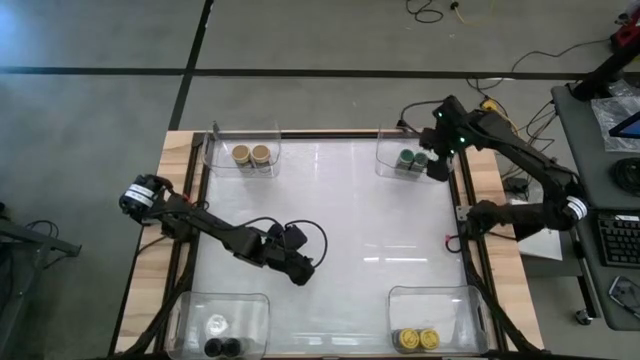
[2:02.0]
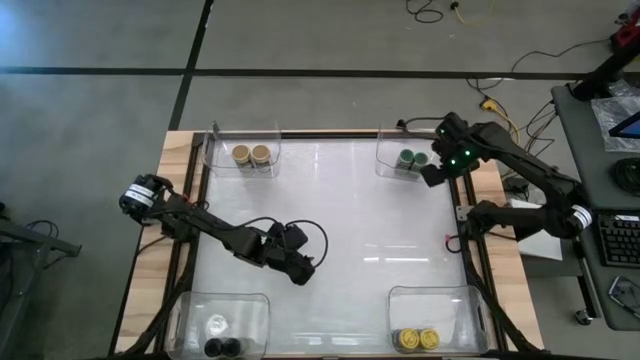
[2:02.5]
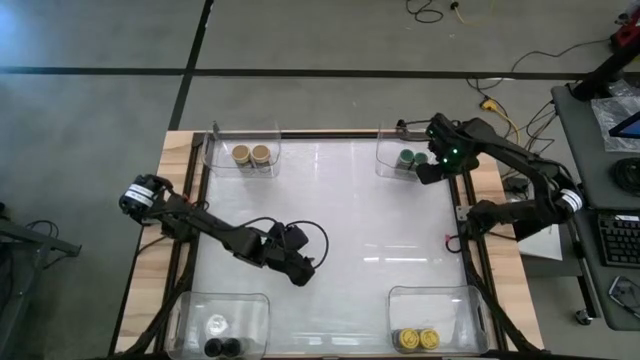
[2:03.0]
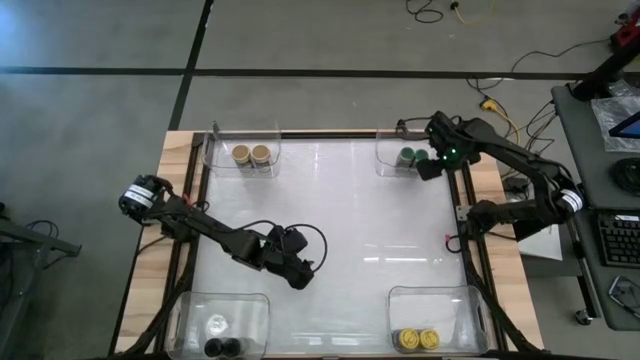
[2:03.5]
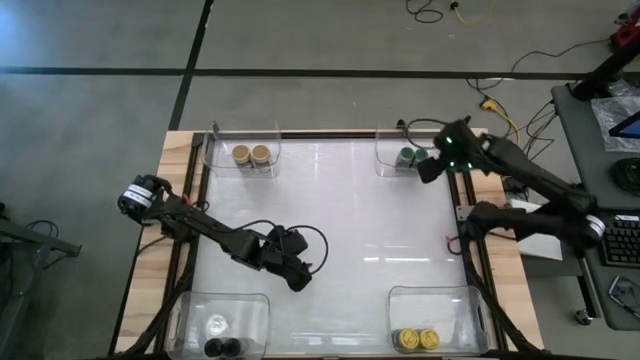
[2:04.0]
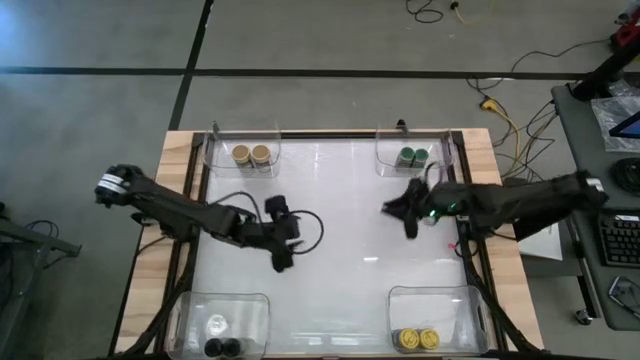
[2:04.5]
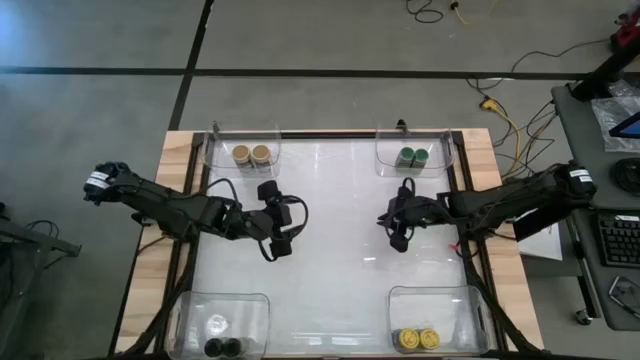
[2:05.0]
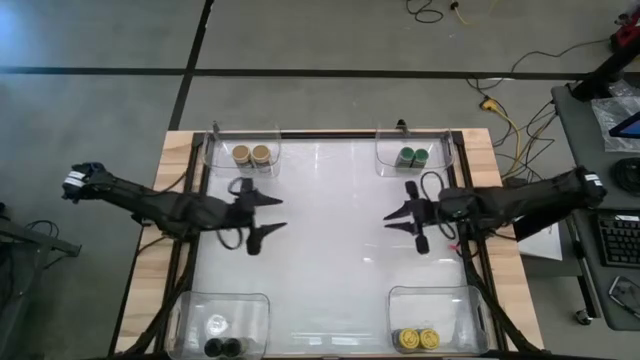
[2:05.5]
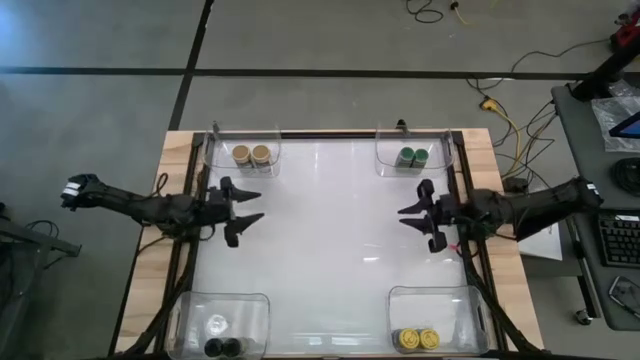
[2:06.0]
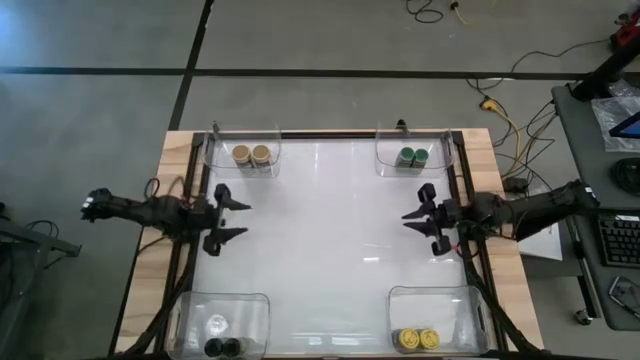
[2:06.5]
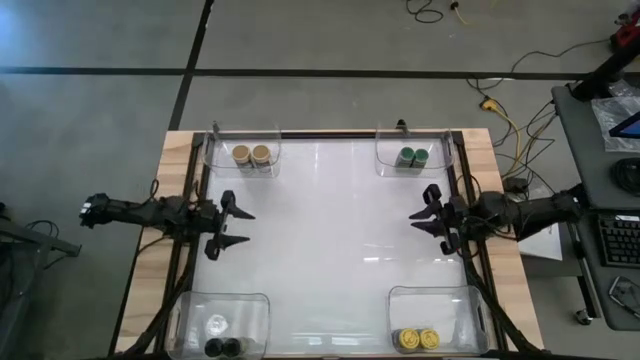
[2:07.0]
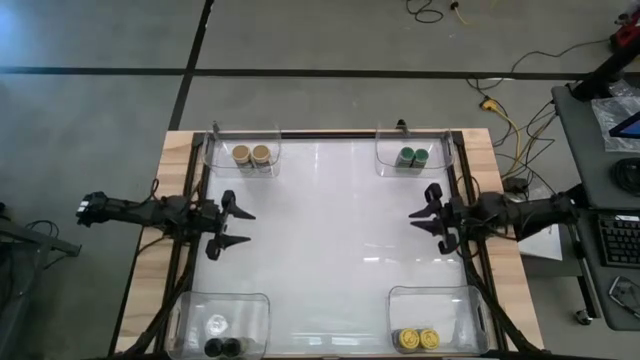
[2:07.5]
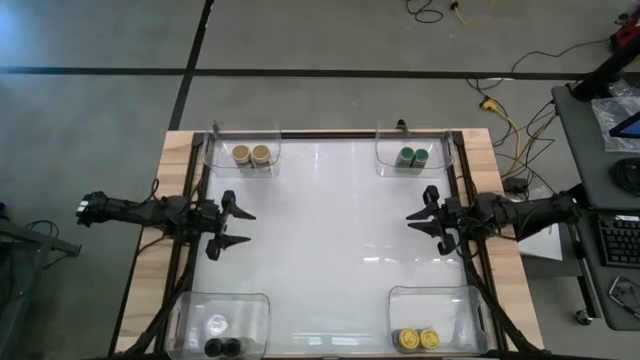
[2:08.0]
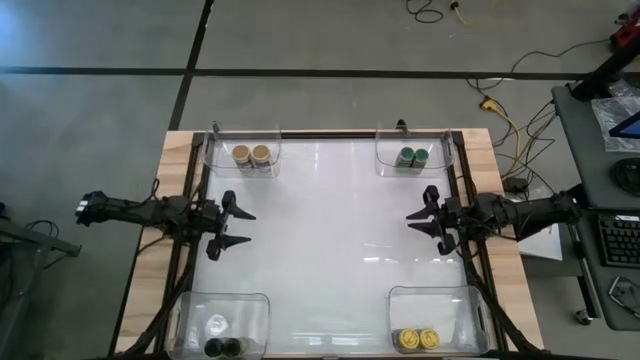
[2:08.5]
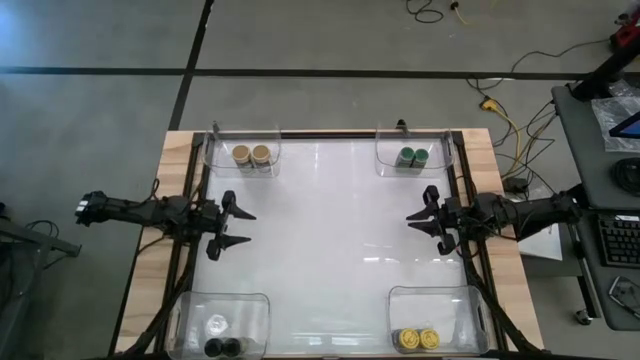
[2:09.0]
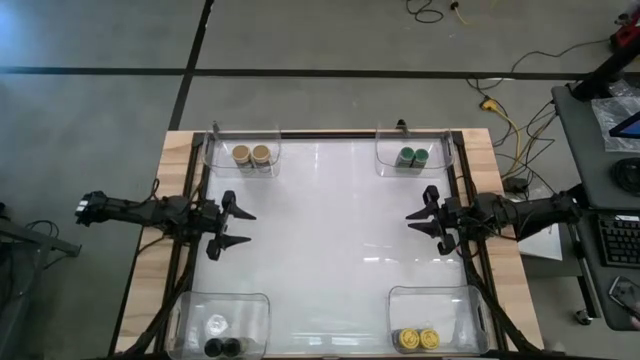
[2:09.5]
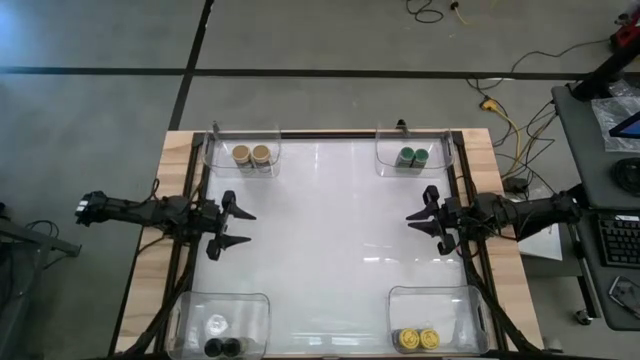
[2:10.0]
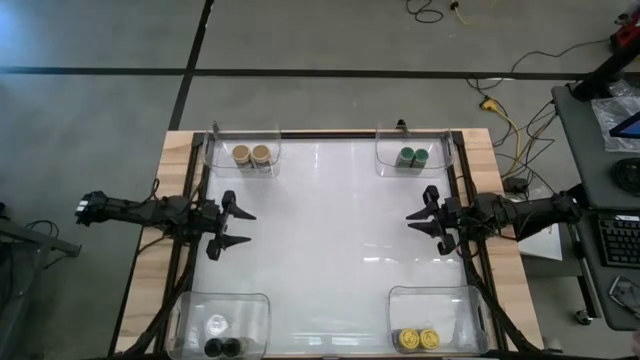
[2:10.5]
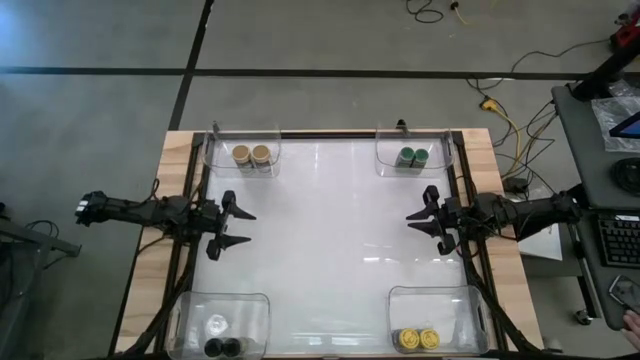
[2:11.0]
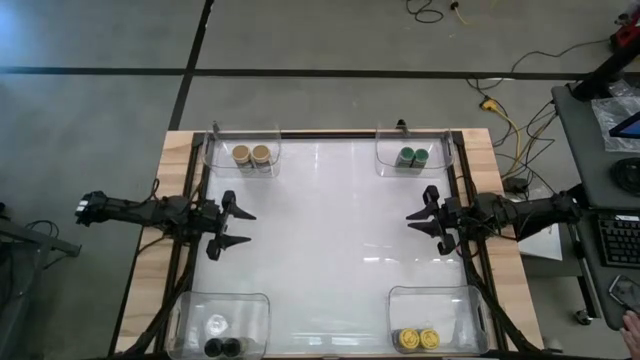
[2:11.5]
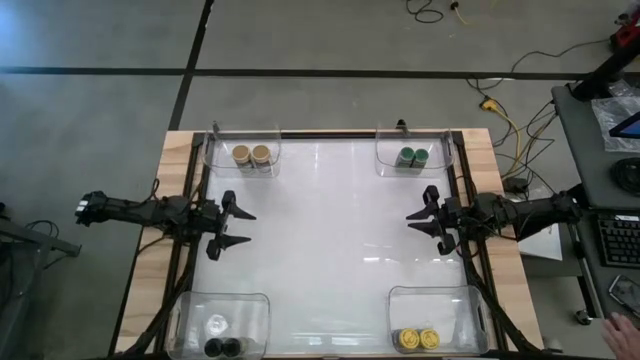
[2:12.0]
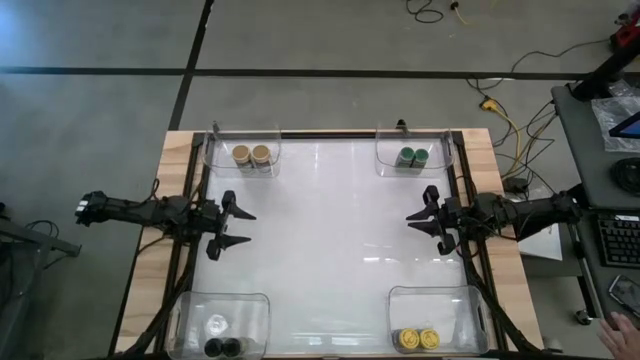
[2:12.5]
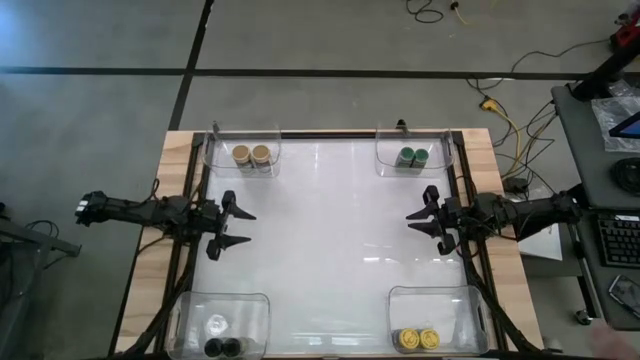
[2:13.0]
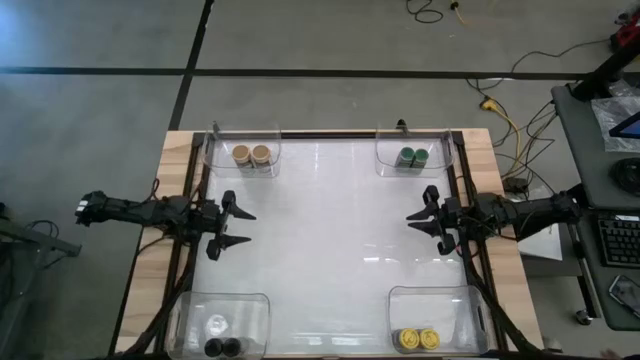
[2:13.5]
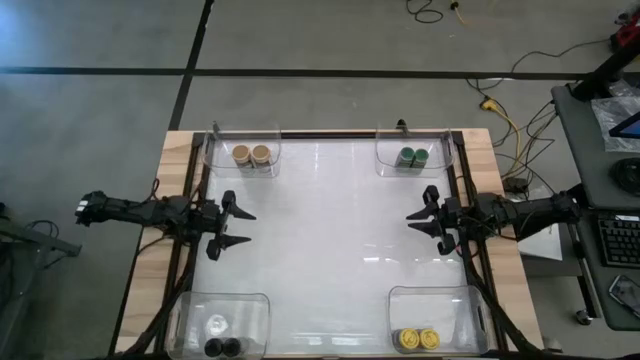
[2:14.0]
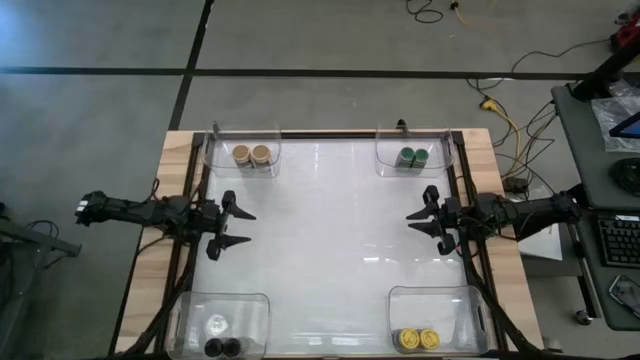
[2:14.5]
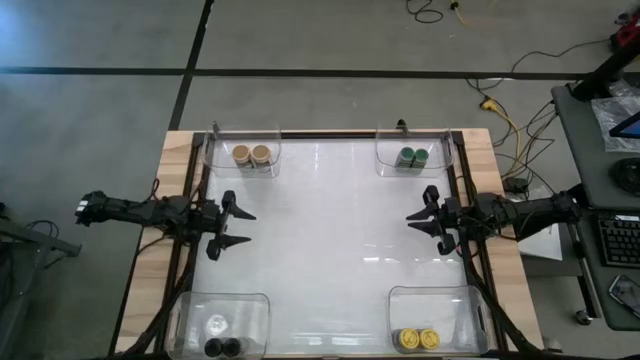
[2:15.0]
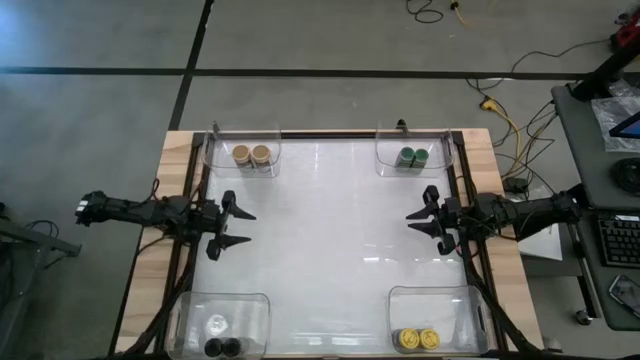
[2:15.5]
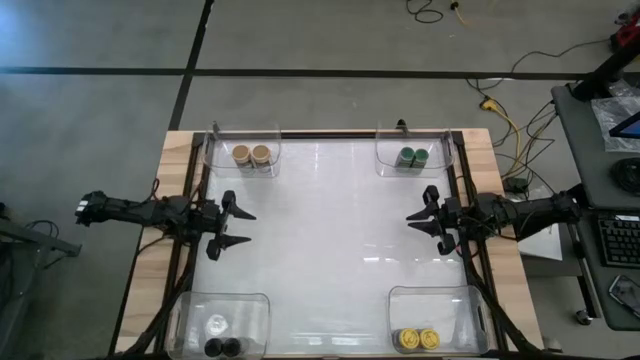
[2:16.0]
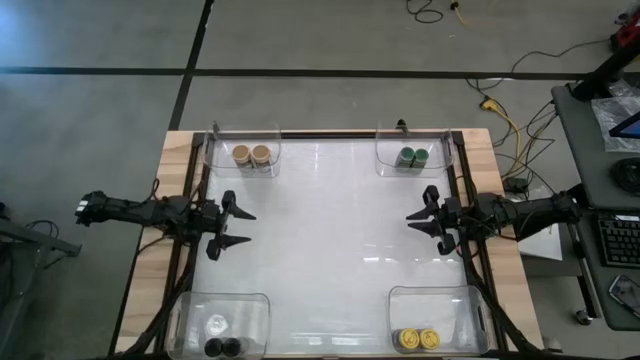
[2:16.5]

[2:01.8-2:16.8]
Task: Sort spices by type
Return to Home Position

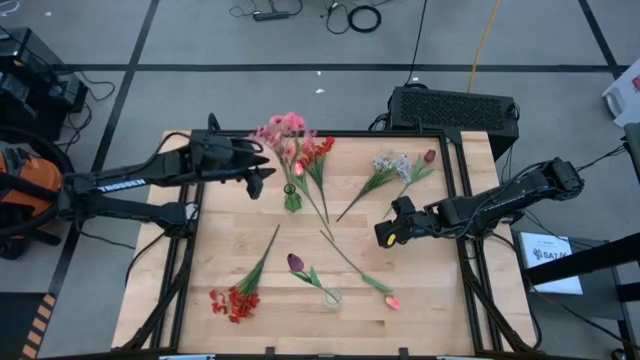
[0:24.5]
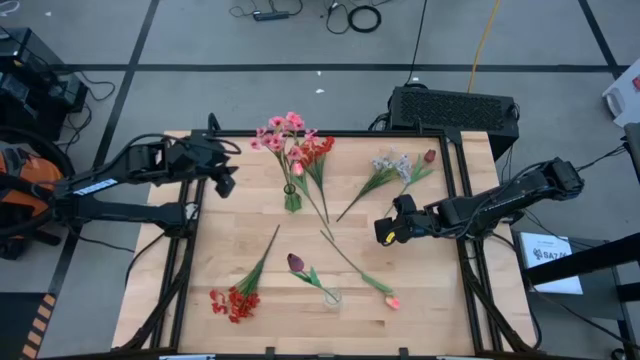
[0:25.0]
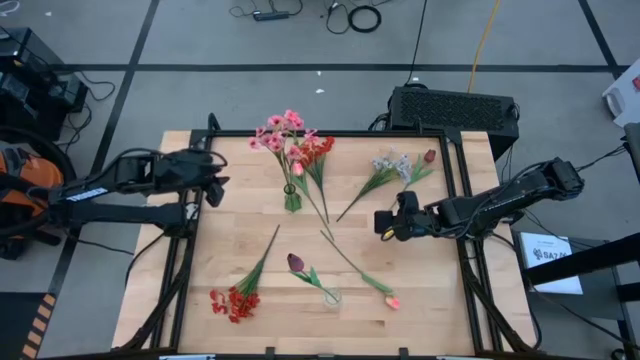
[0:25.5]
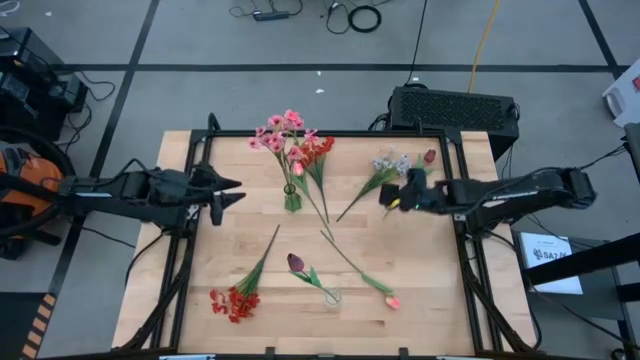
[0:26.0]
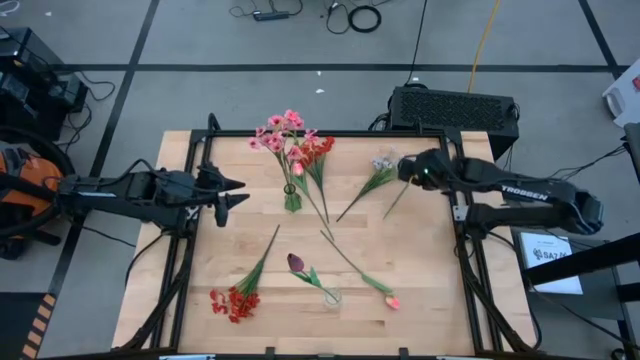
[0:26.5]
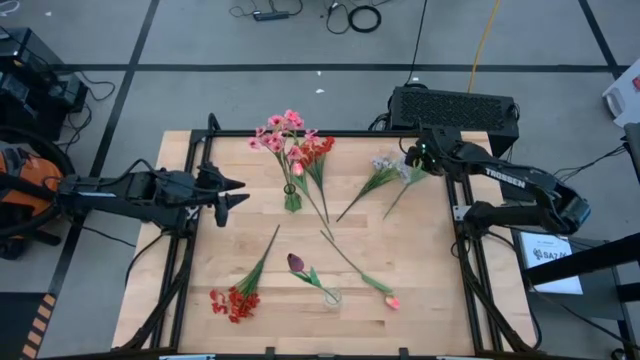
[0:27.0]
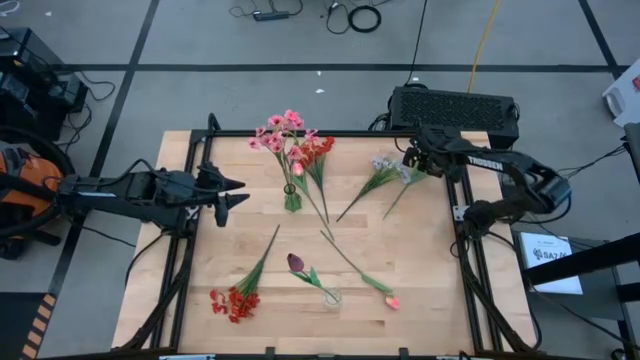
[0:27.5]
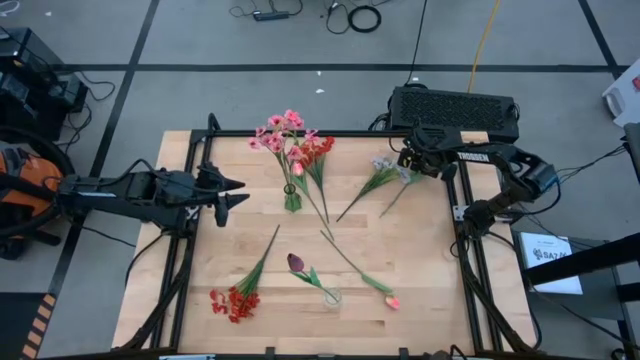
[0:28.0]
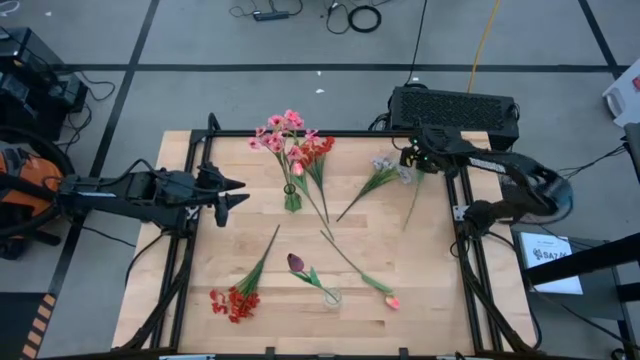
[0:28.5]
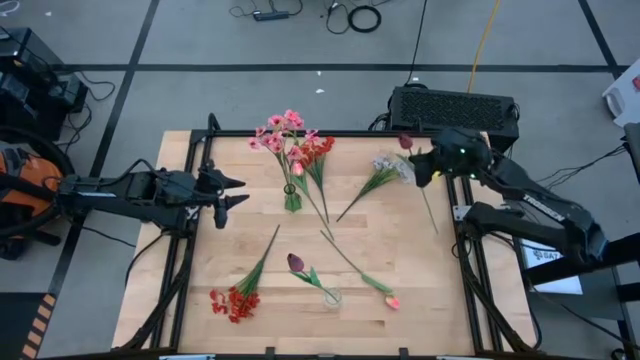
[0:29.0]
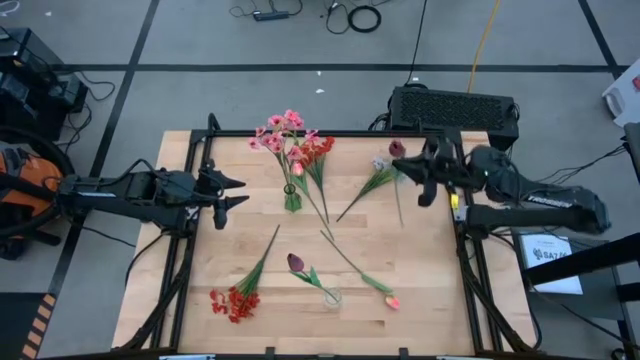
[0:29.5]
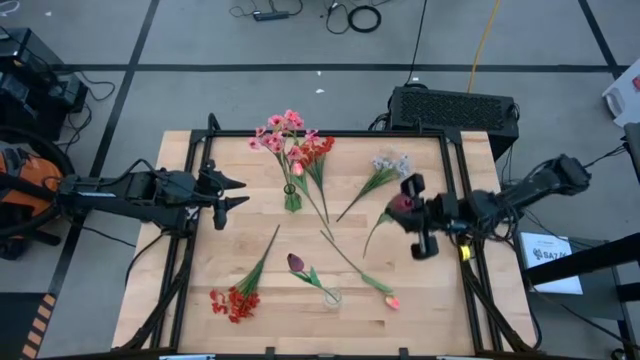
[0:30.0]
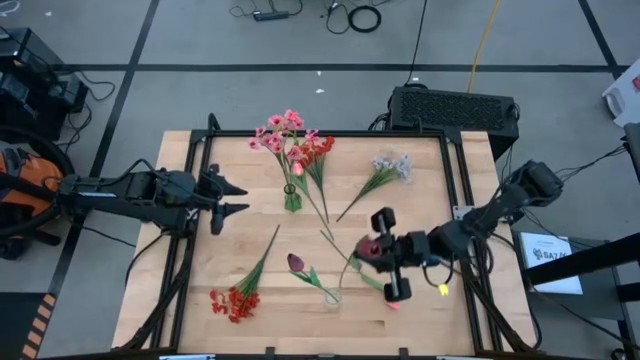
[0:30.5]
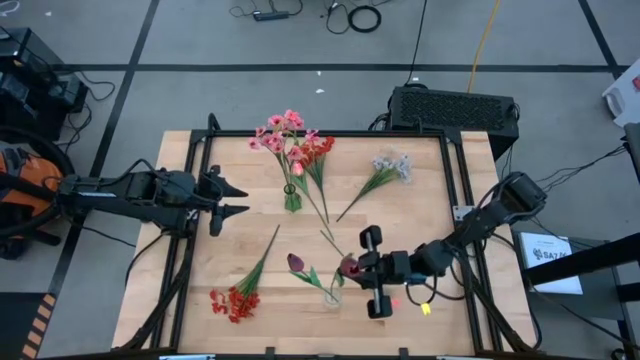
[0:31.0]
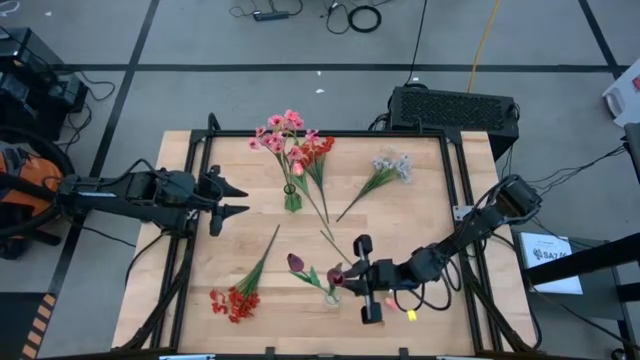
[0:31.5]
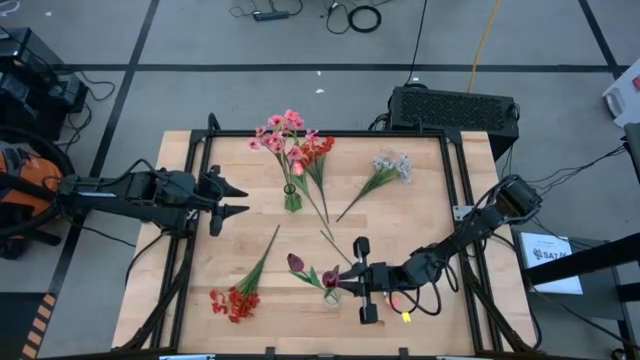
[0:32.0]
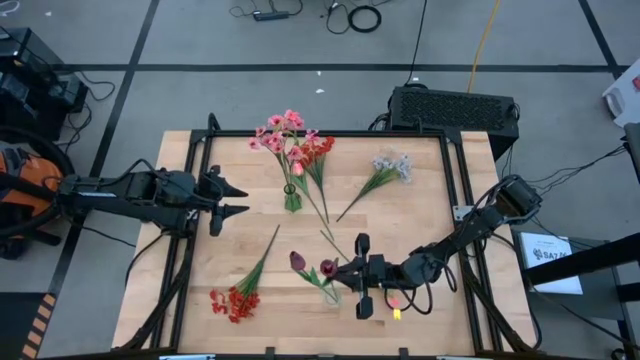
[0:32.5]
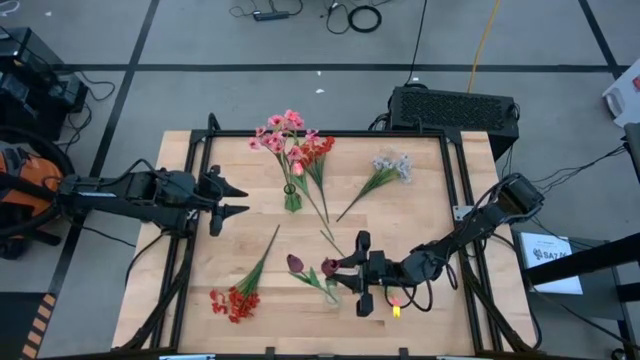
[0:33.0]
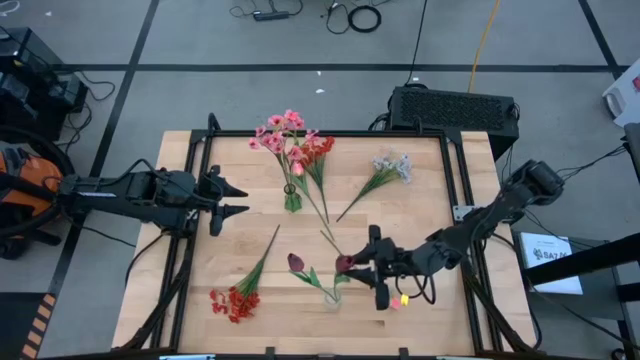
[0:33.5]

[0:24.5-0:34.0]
Task: Sort flowers into vase by color
Put the red tulip into the transparent vase
